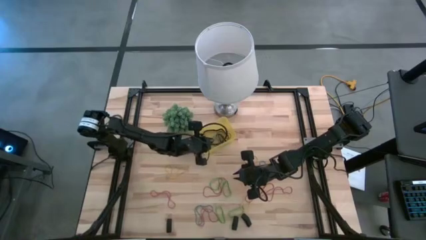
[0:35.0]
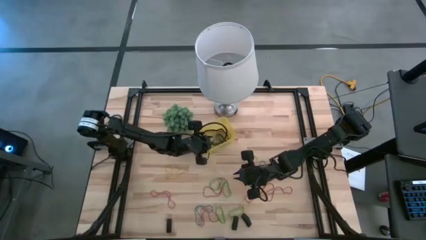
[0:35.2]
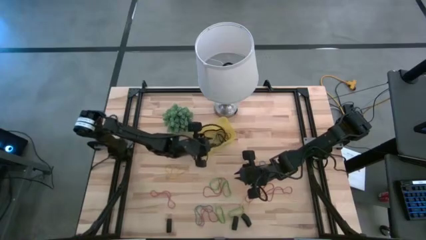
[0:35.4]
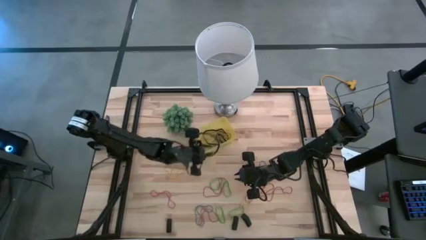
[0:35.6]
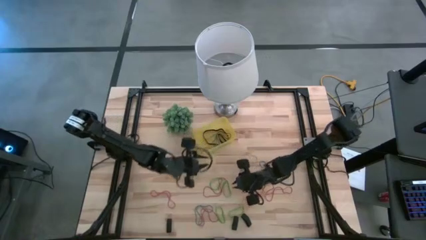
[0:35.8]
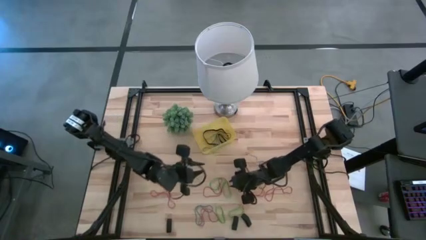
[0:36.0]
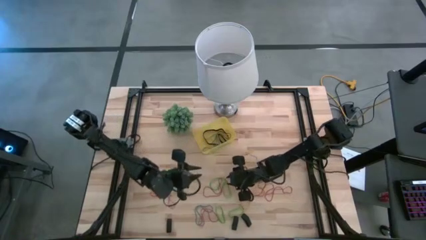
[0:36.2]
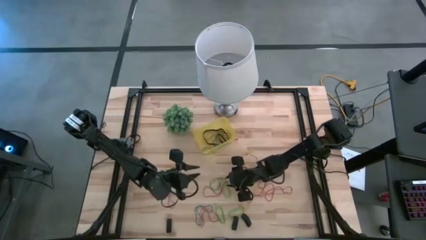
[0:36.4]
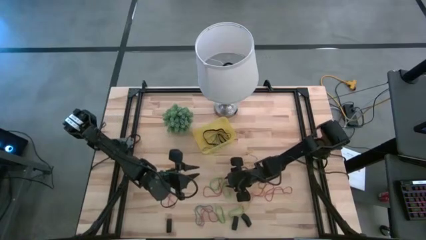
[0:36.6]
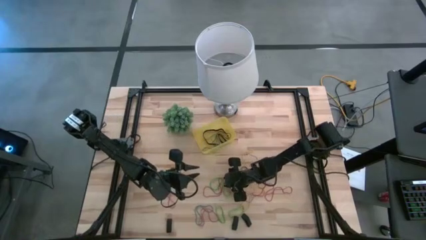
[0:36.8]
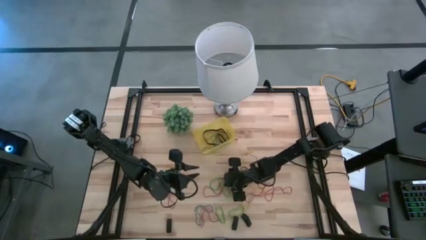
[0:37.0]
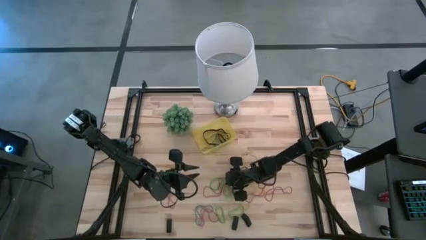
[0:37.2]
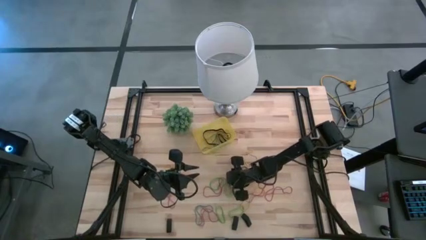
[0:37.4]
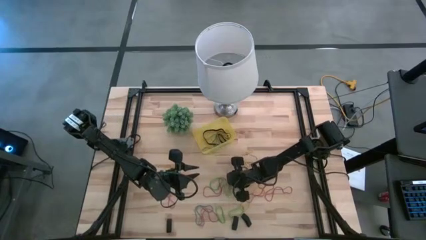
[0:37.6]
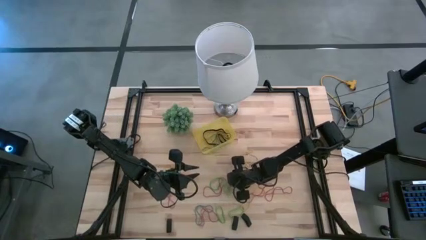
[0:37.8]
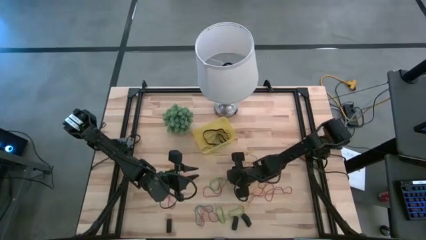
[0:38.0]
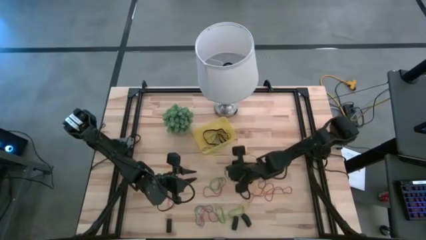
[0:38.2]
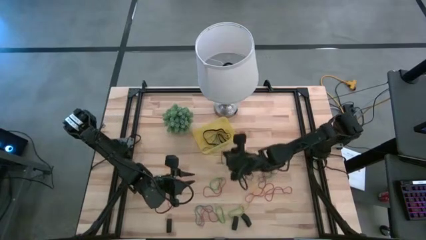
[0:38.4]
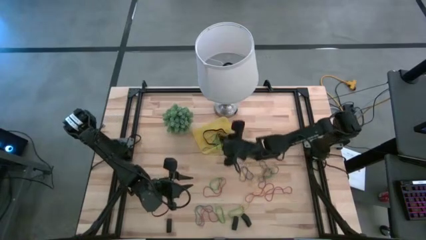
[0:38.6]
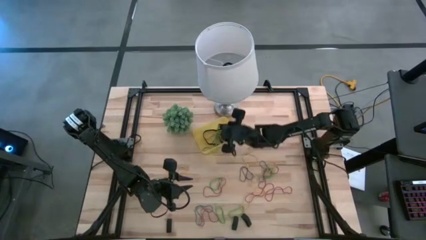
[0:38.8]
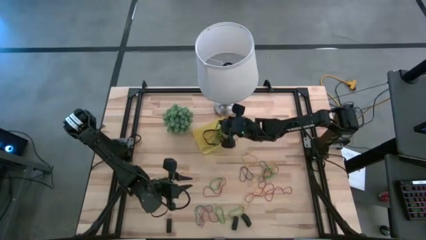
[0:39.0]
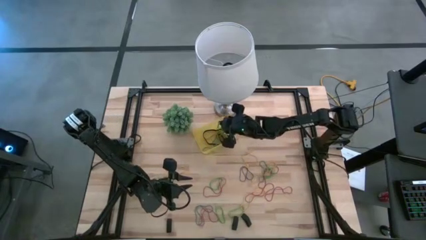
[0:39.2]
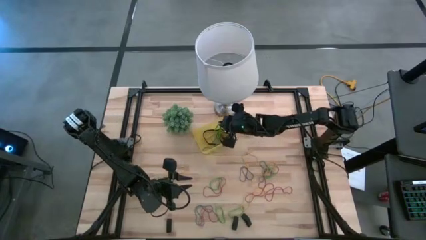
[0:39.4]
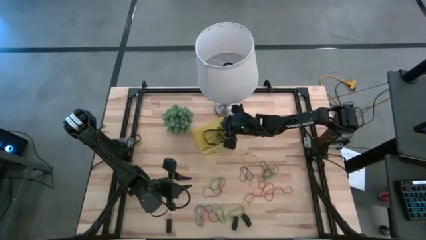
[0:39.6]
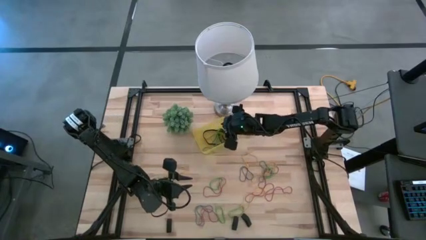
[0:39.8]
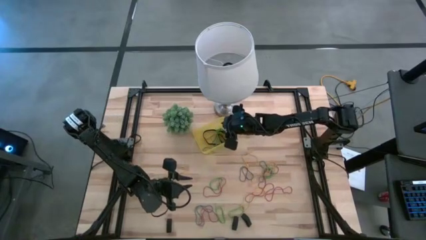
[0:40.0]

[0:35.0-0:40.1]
Task: Pick and place rubber bands into bin
Put the green rubber band into the yellow bin

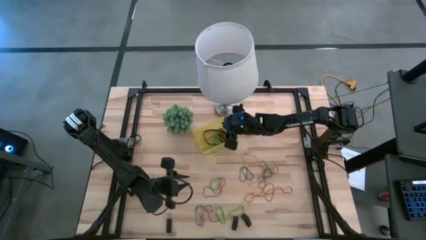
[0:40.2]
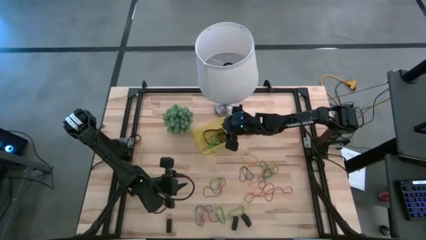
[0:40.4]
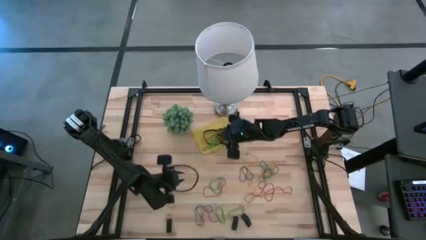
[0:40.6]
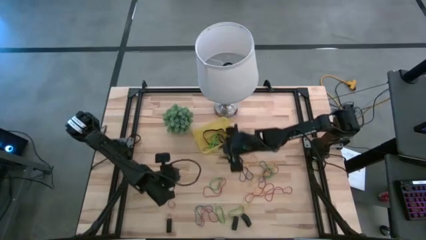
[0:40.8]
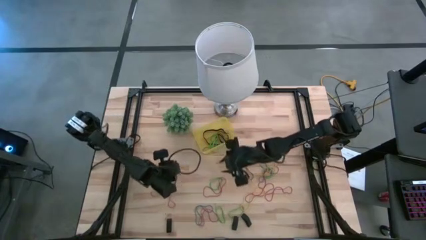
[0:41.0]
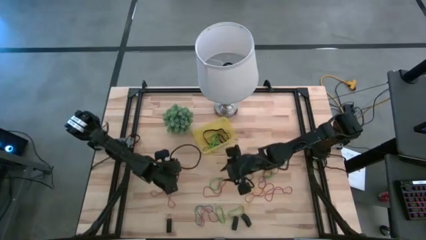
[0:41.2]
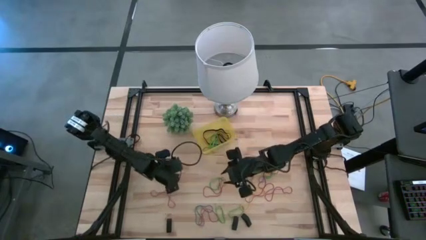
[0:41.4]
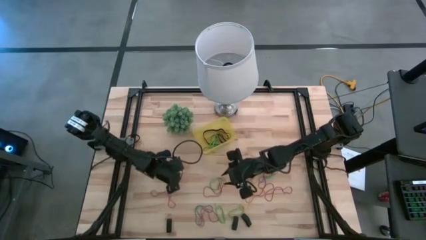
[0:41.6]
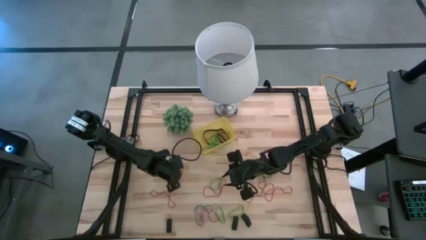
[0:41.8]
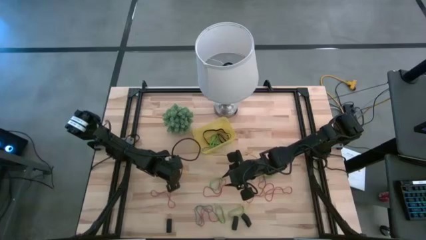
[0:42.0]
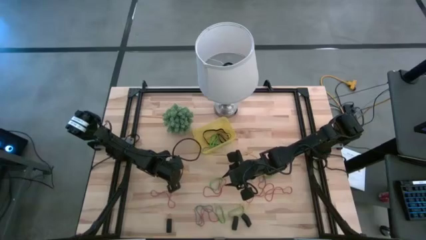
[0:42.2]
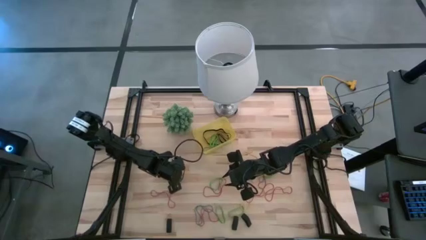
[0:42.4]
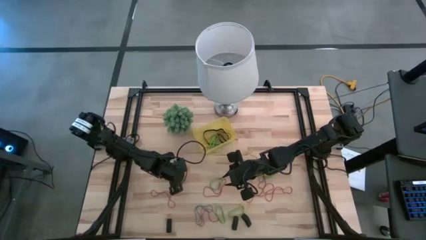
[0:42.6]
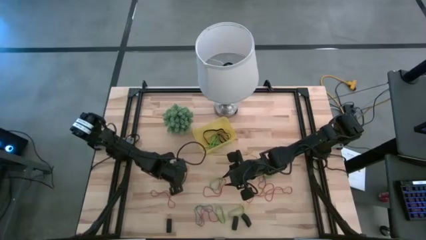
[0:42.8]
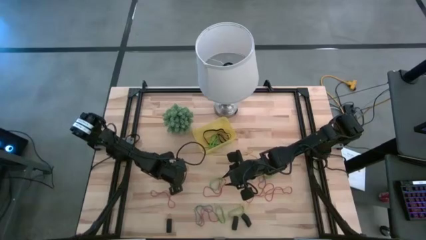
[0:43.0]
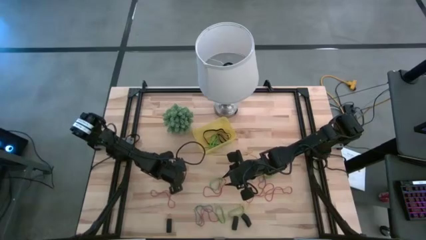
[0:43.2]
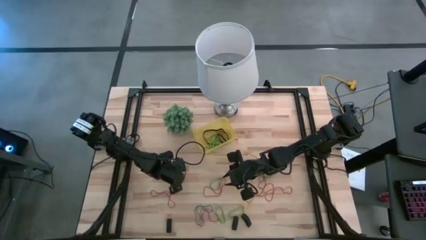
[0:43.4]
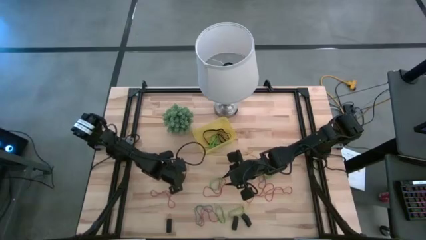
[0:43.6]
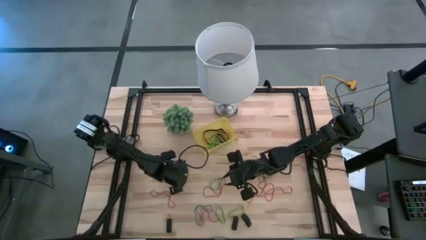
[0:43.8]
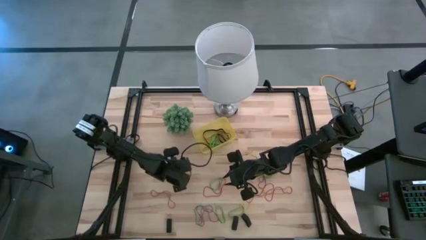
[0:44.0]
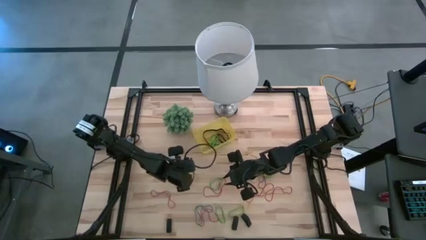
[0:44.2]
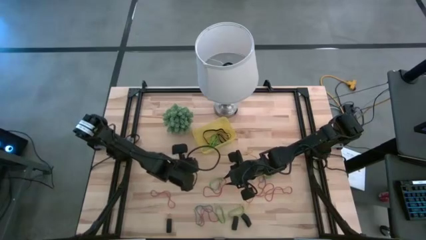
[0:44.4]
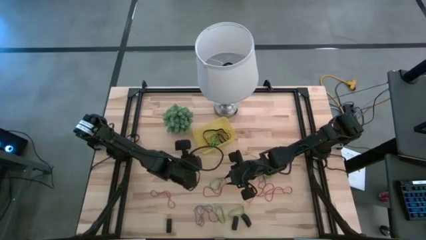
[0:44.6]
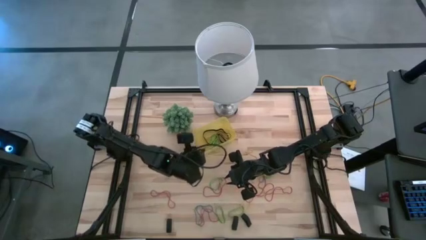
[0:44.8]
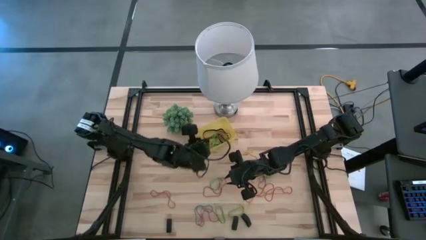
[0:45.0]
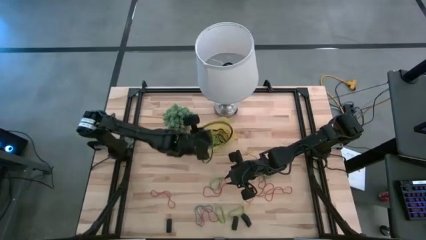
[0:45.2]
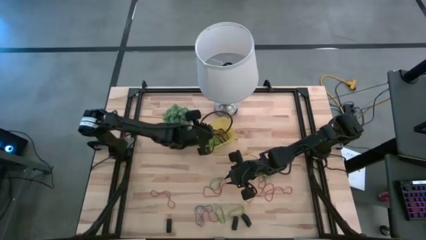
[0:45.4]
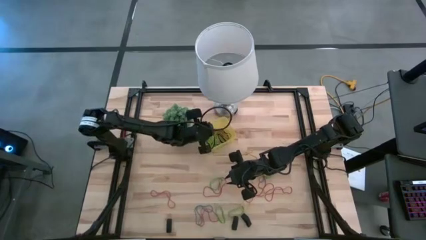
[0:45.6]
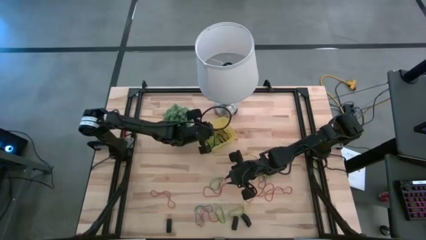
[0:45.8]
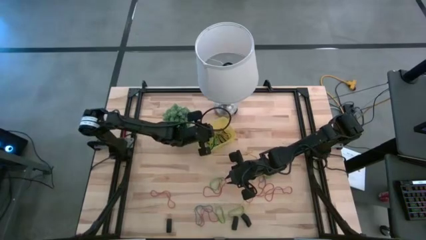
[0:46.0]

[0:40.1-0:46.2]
Put the yellow rubber band into the yellow bin

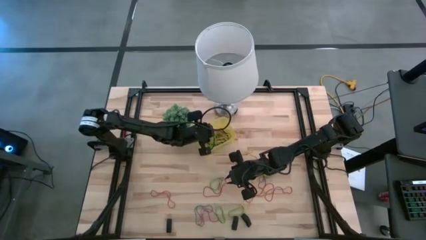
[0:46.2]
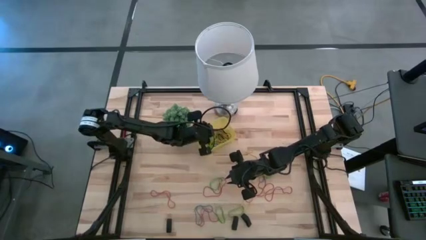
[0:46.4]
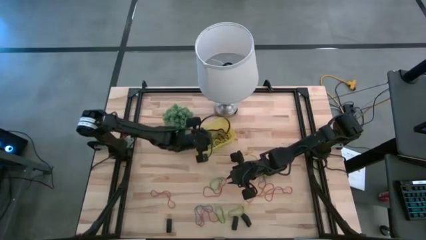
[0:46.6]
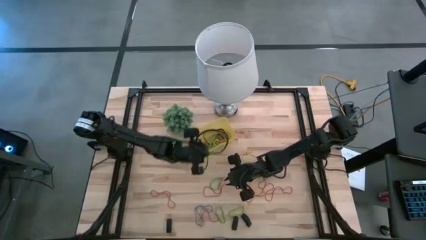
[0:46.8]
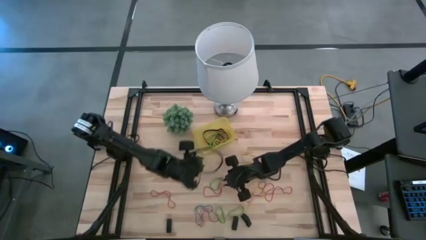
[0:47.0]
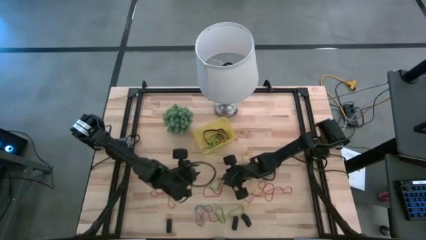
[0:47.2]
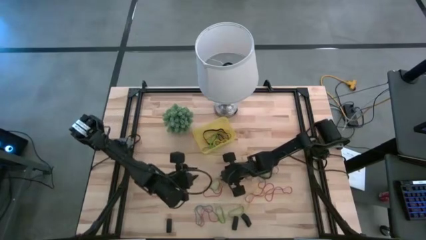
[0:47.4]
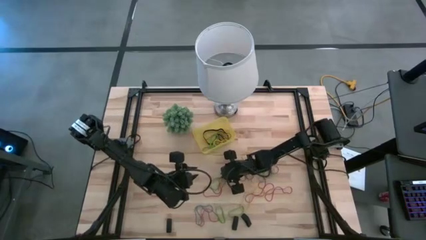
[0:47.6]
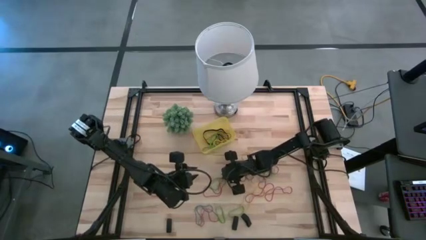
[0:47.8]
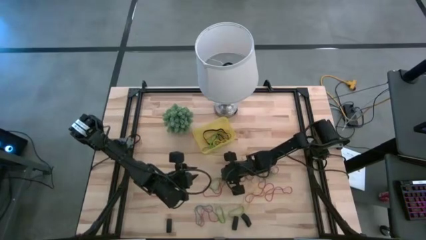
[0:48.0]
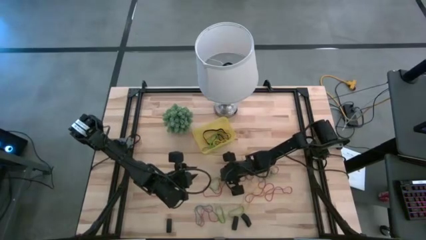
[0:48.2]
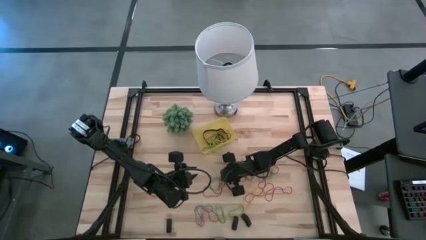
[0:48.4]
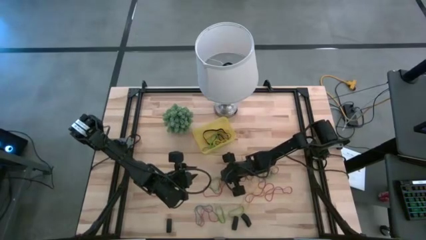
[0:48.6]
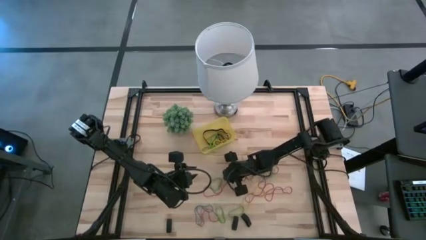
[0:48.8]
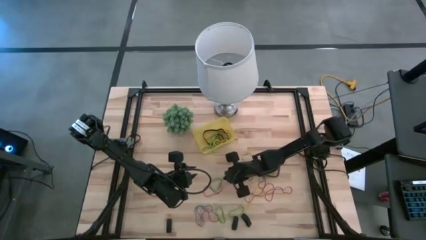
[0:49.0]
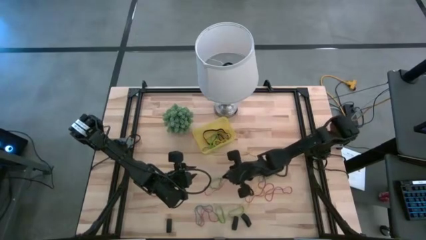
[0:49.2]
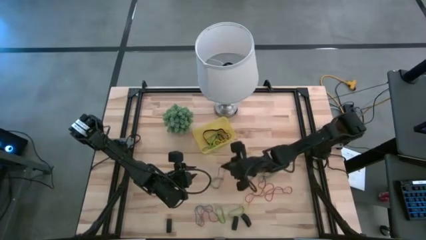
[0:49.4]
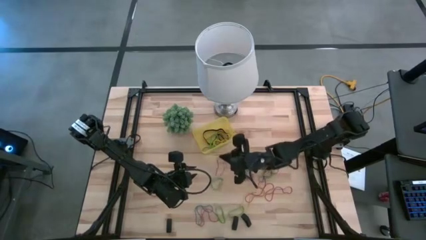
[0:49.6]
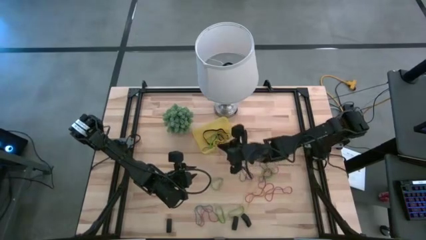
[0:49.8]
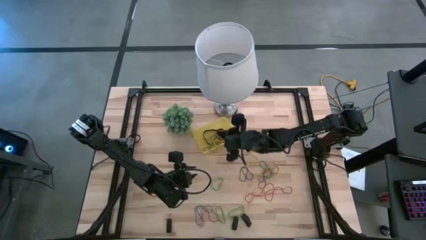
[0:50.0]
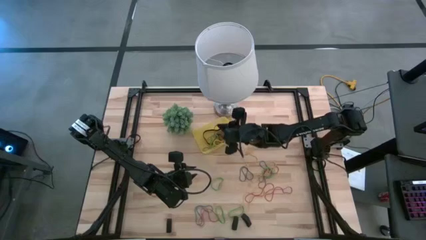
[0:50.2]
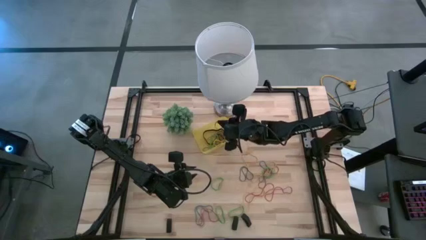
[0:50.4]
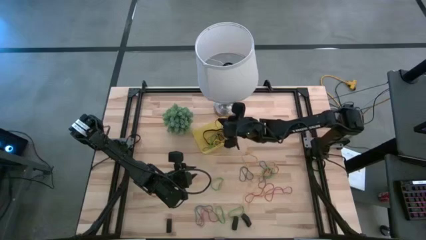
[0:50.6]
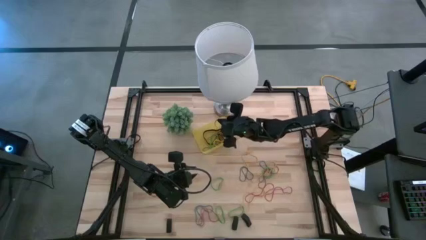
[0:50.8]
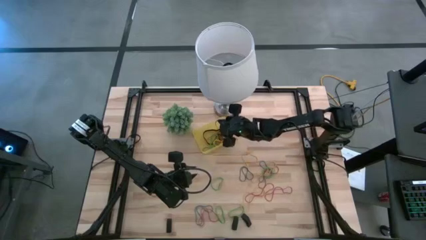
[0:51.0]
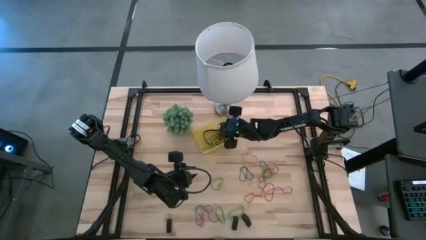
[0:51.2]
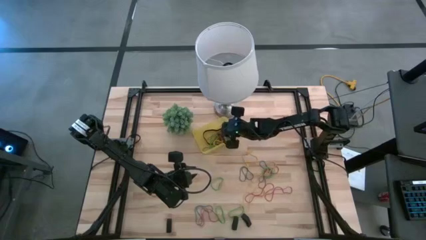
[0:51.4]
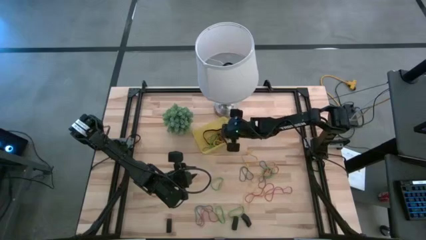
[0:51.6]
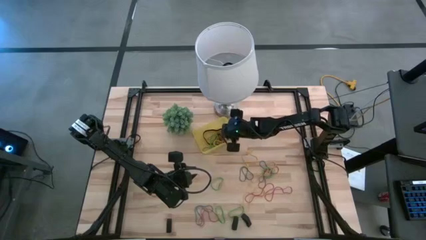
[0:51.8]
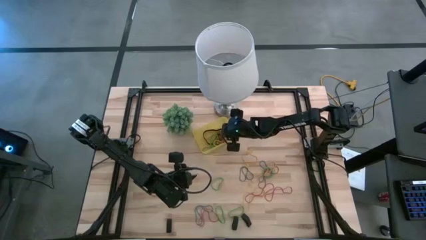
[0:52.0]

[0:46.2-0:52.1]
Put the red rubber band into the yellow bin
